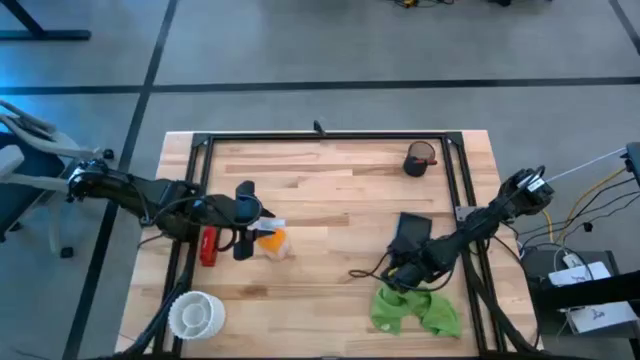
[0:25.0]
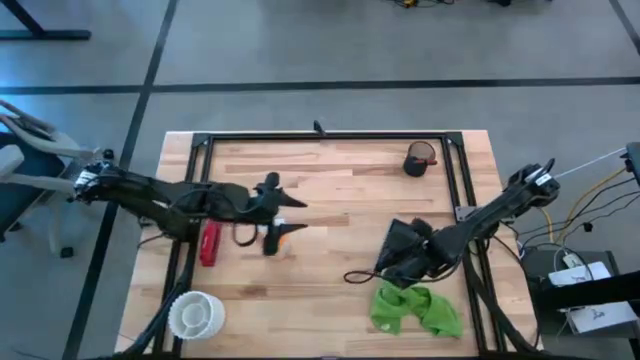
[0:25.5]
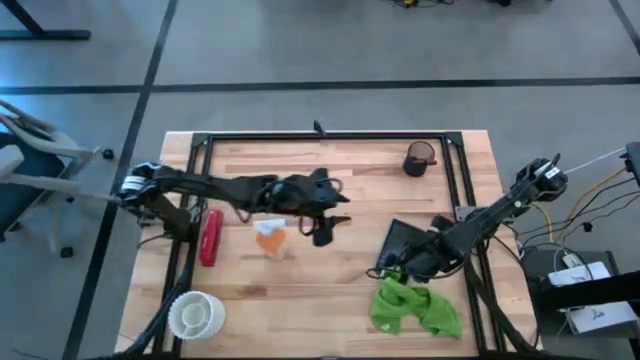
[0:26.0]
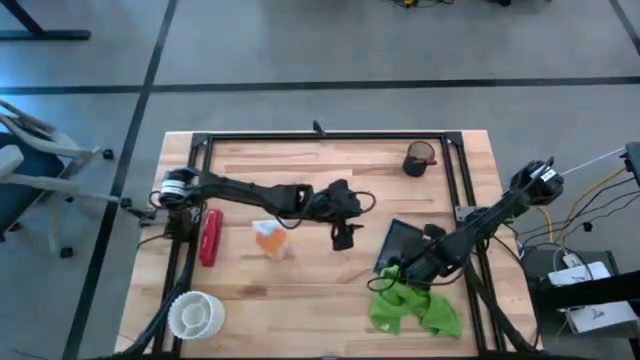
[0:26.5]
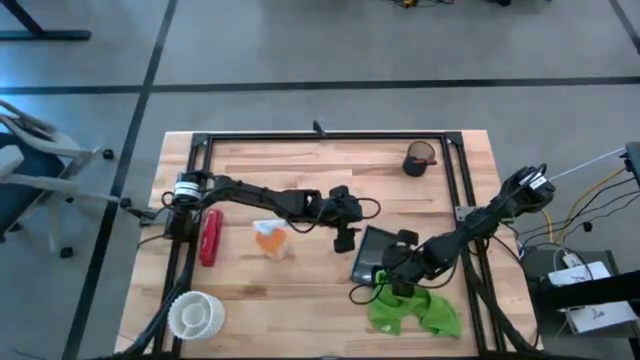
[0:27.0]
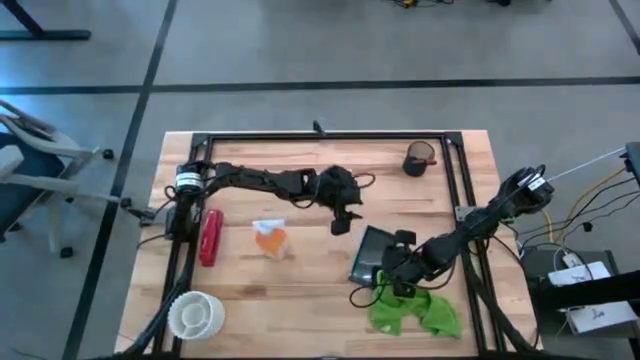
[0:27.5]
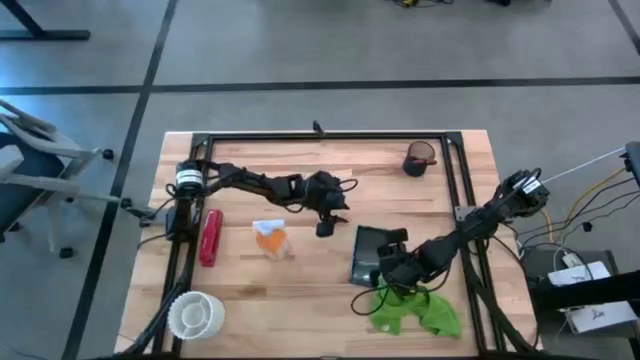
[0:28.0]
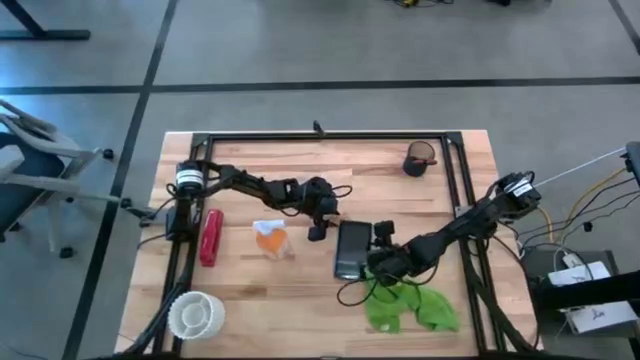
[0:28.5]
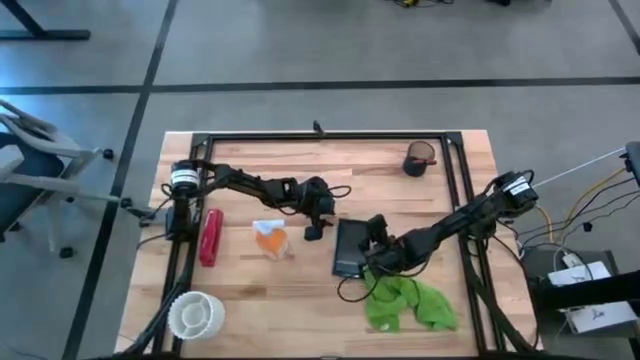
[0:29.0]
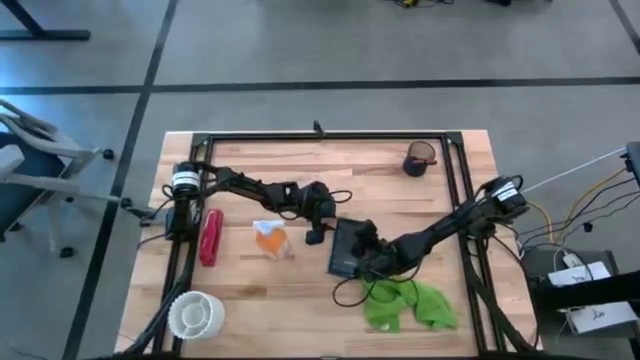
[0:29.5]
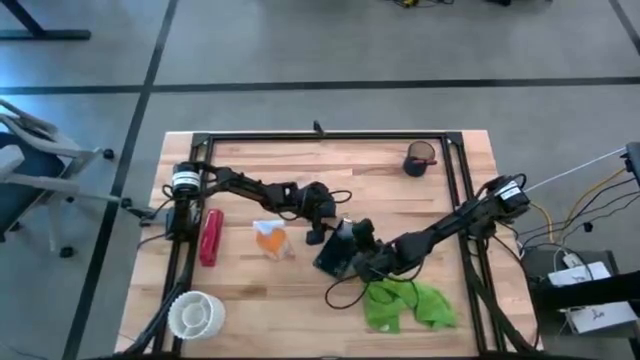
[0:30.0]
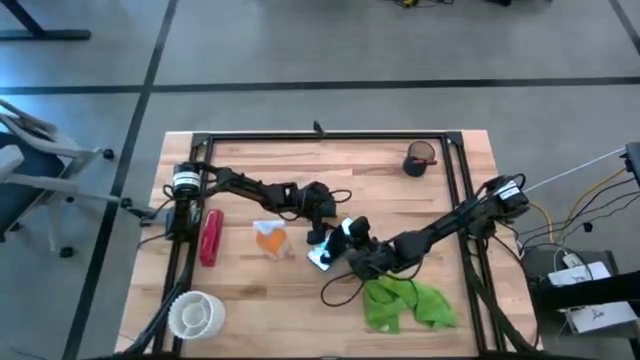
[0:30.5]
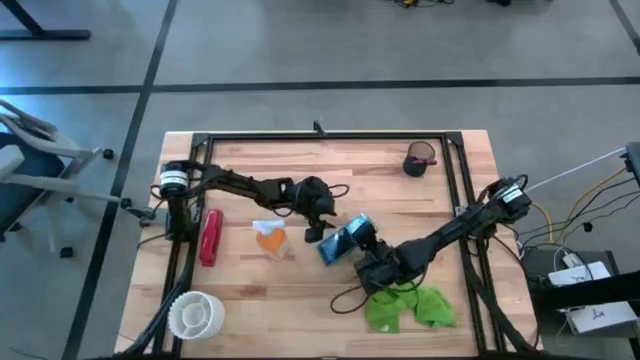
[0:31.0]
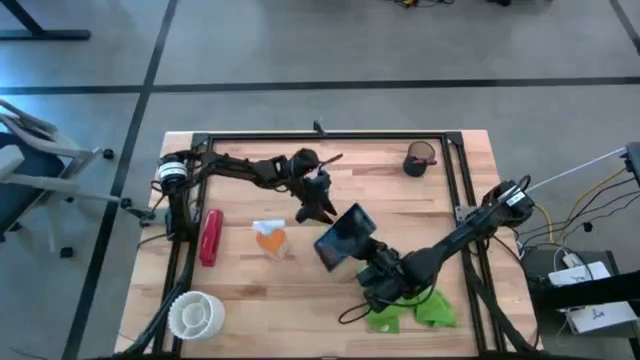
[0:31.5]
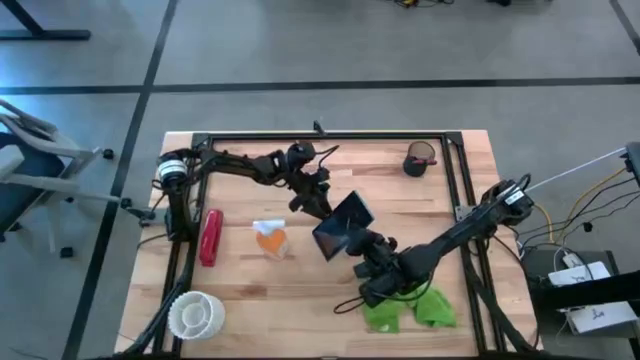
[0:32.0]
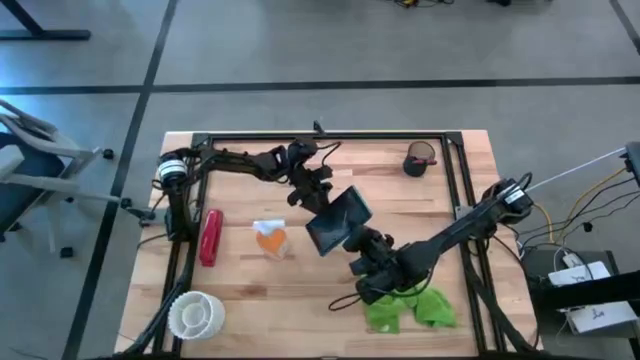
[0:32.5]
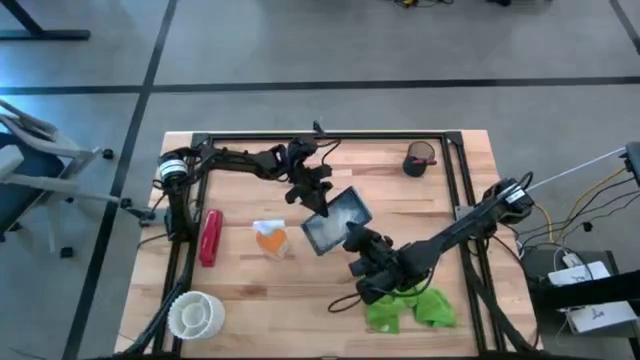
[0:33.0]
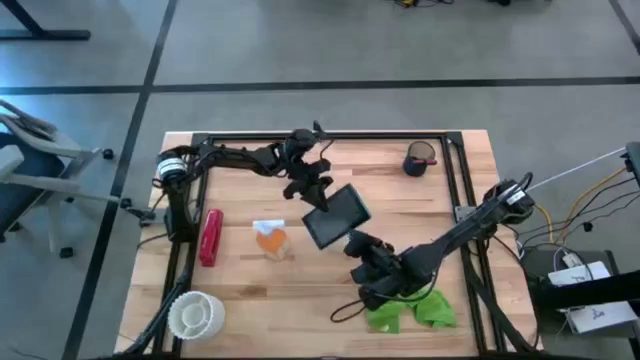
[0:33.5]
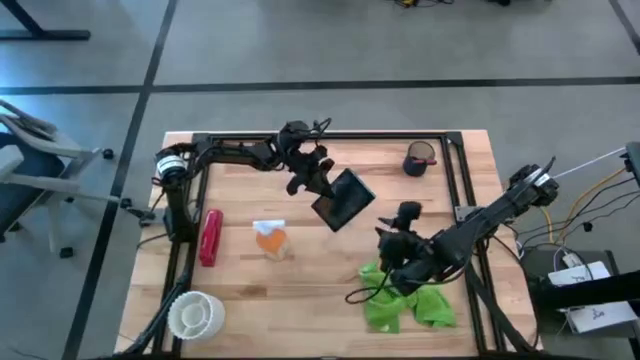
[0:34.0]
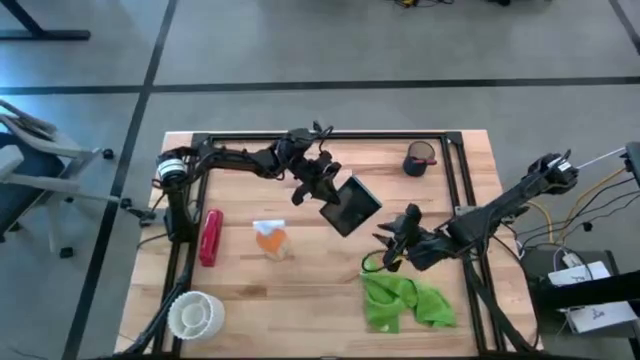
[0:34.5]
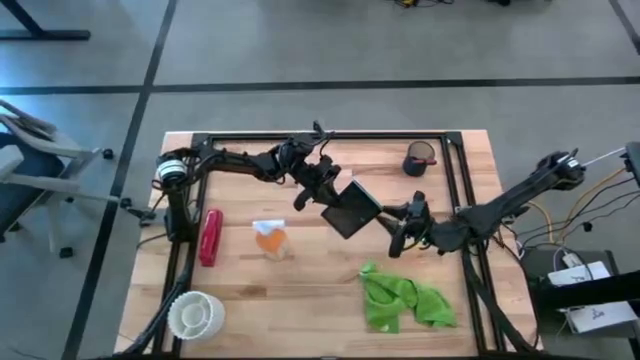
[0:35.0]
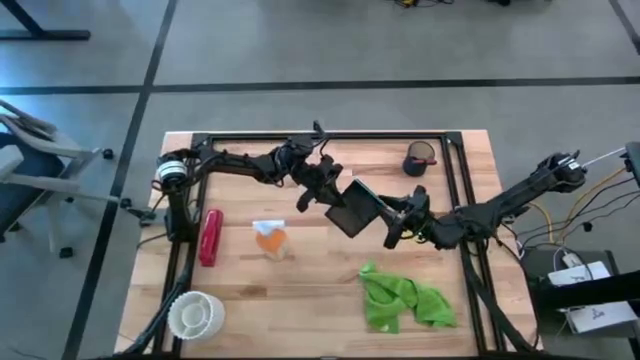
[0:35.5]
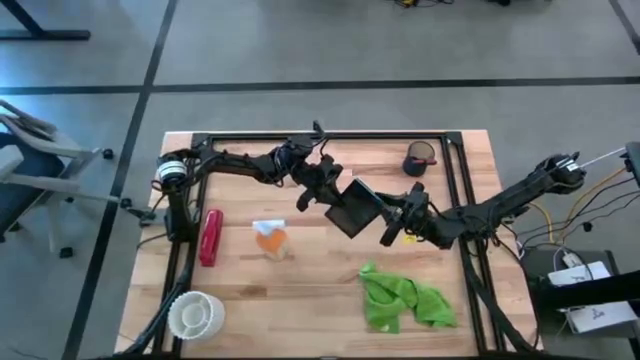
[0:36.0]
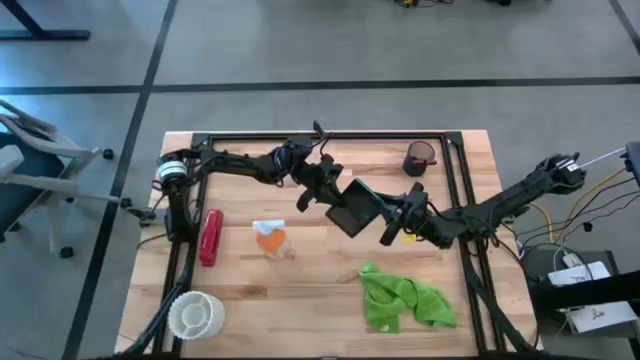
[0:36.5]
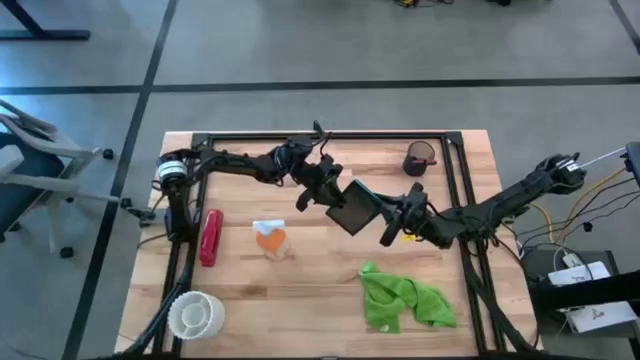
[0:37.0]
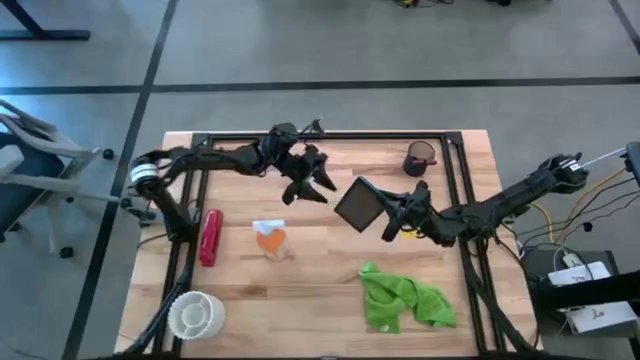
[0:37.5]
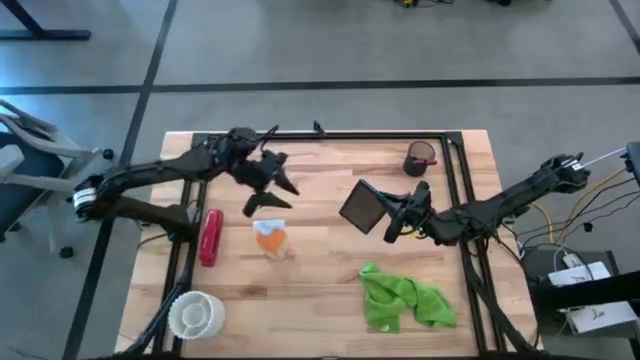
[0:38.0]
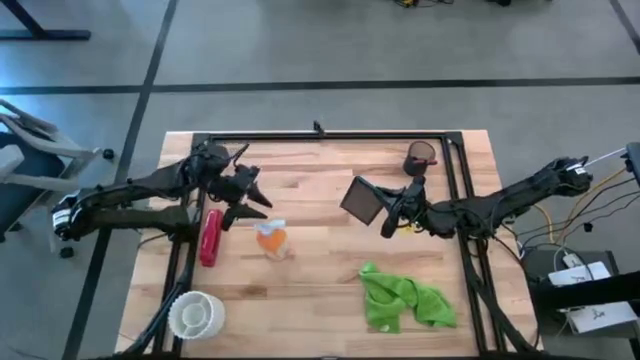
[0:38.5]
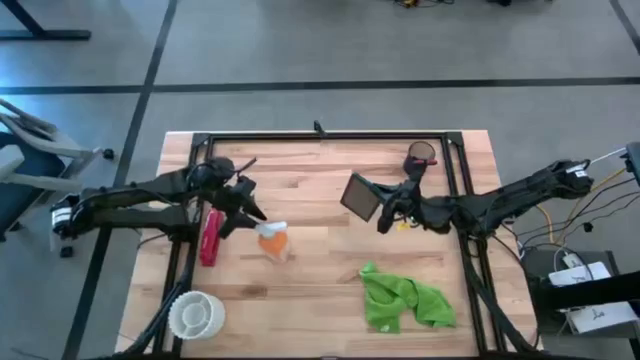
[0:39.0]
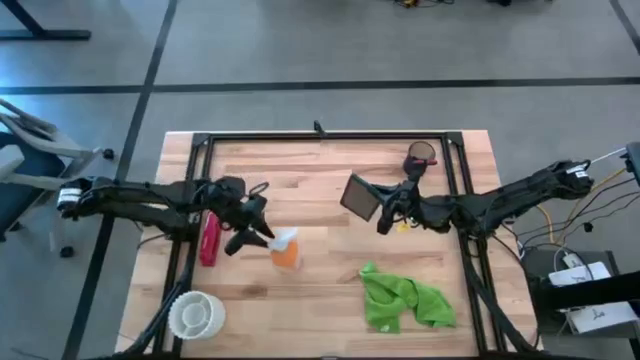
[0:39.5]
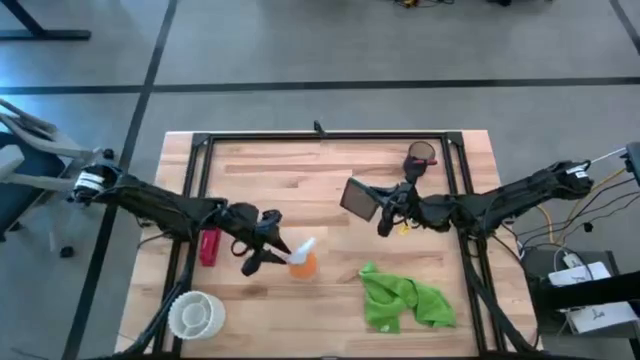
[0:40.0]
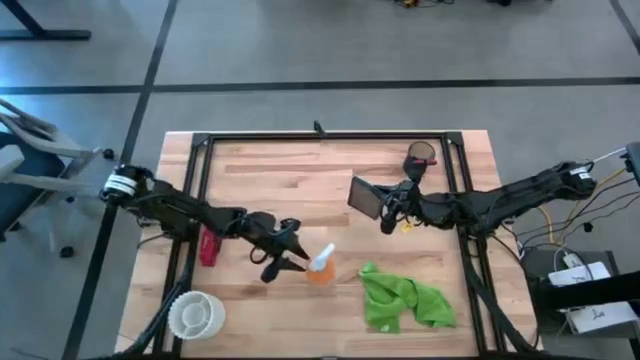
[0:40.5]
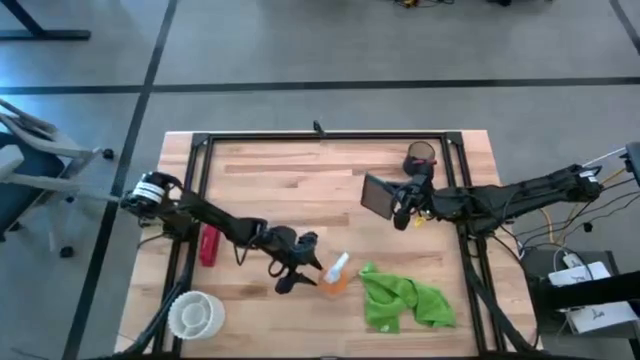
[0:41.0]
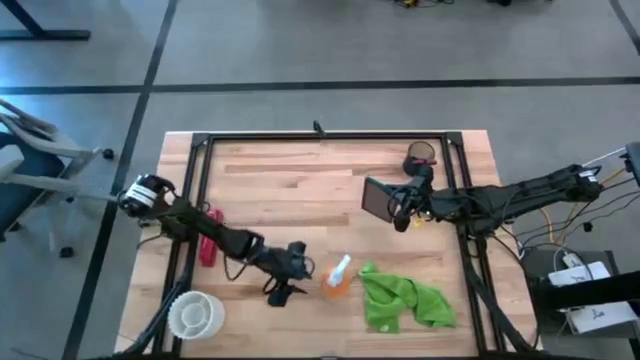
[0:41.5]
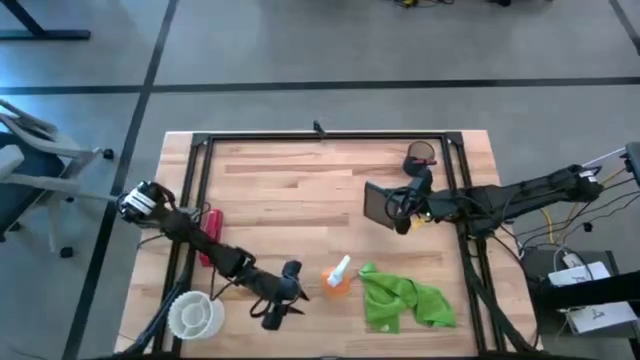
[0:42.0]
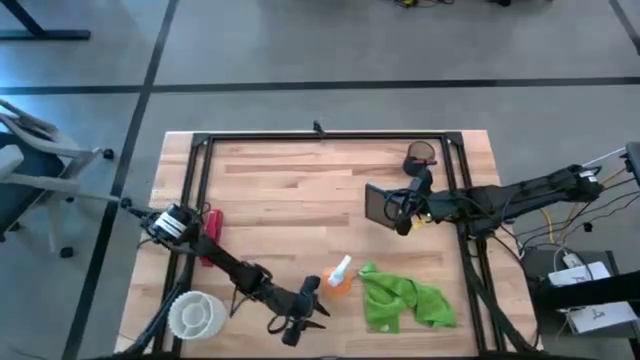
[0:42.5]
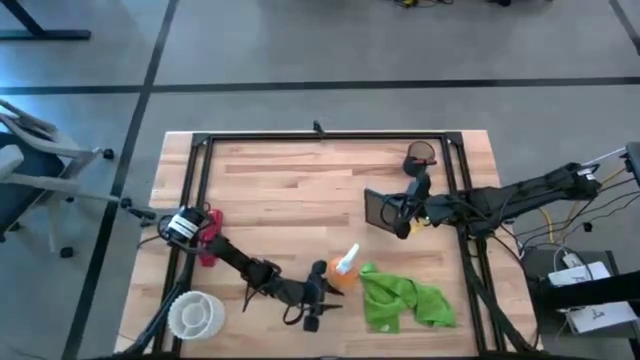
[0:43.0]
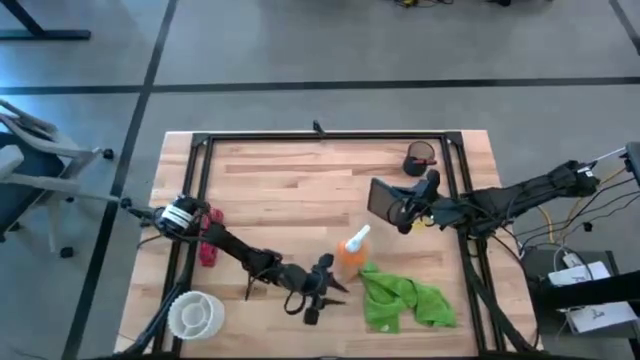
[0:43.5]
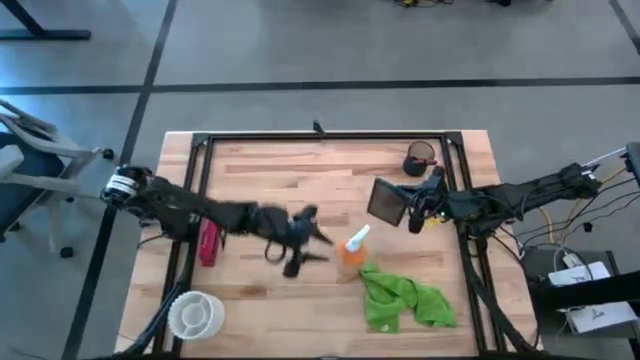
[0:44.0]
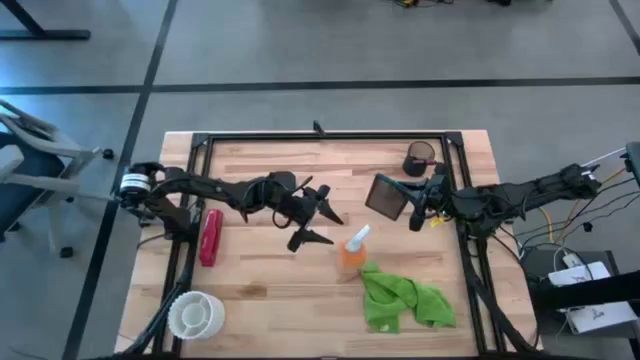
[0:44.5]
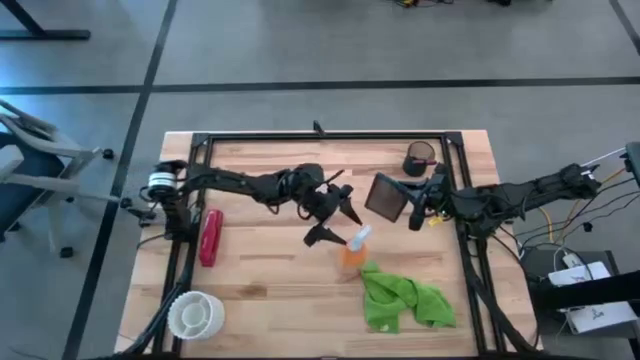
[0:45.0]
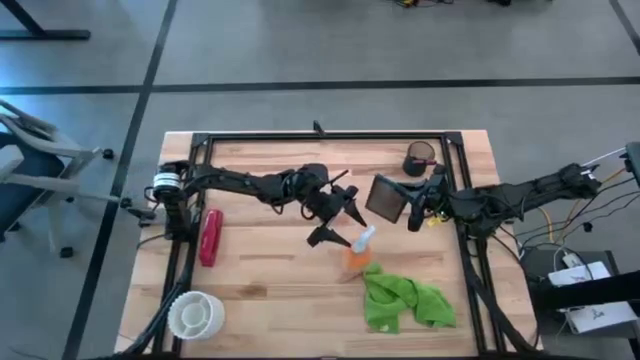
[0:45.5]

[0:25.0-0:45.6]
Task: Apply microfiber cloth
Spray the front screen of the blue cellphone with the yellow spray bottle
